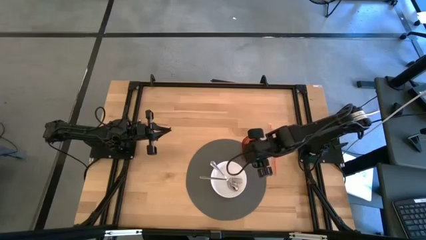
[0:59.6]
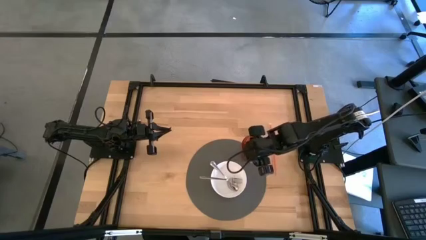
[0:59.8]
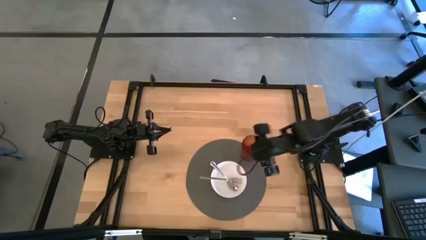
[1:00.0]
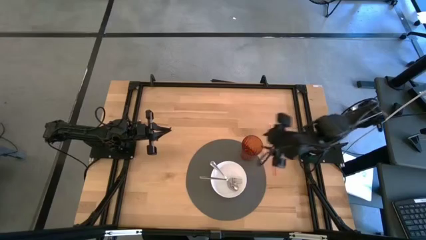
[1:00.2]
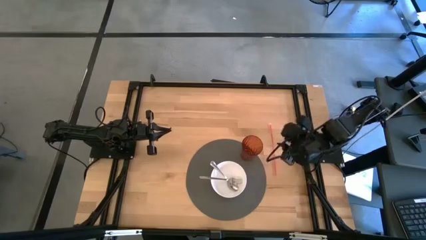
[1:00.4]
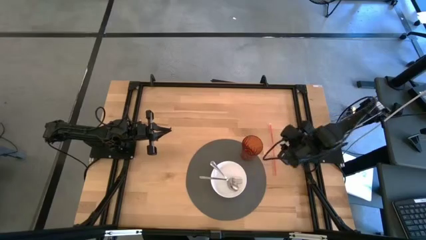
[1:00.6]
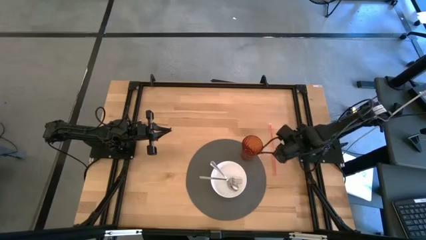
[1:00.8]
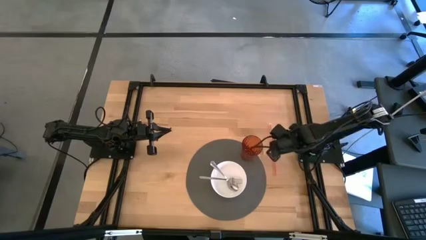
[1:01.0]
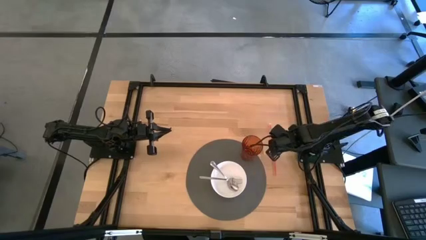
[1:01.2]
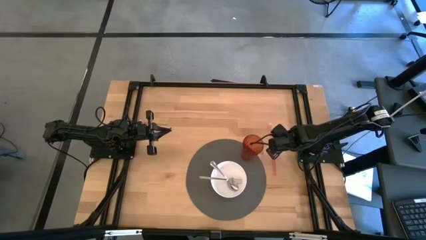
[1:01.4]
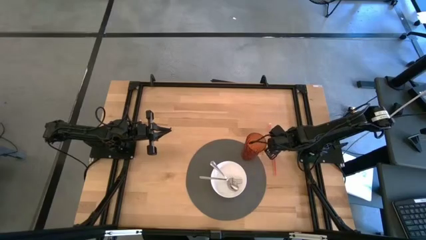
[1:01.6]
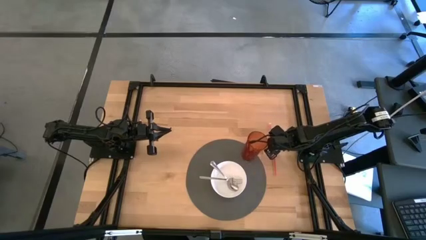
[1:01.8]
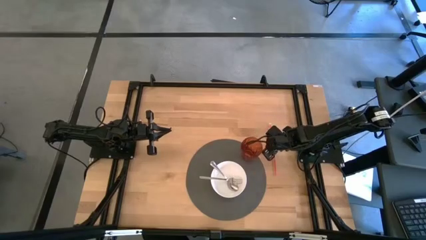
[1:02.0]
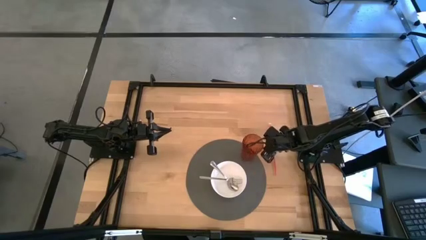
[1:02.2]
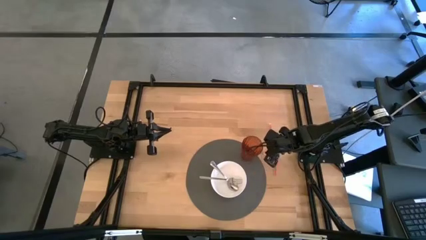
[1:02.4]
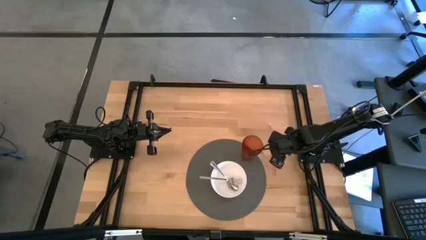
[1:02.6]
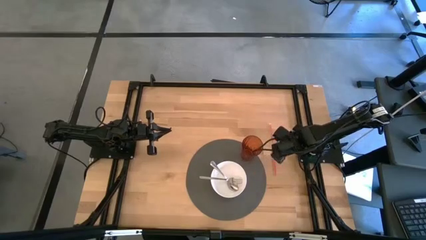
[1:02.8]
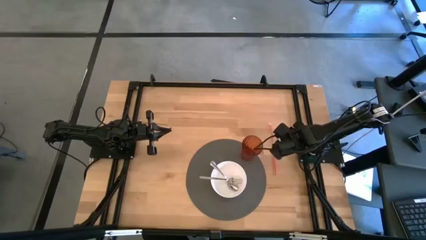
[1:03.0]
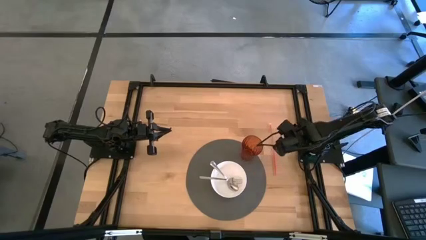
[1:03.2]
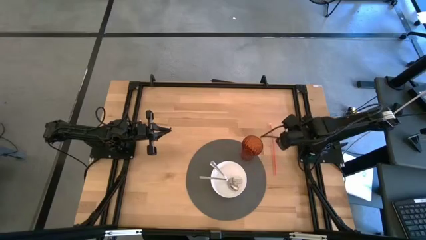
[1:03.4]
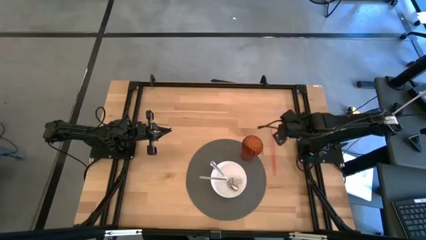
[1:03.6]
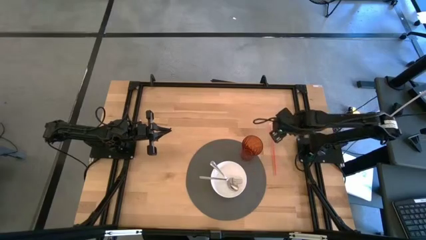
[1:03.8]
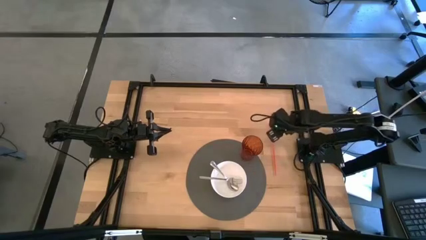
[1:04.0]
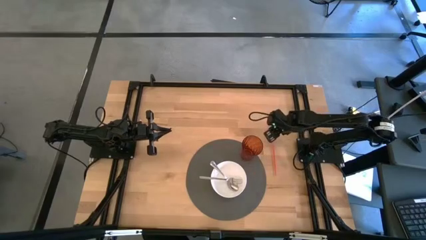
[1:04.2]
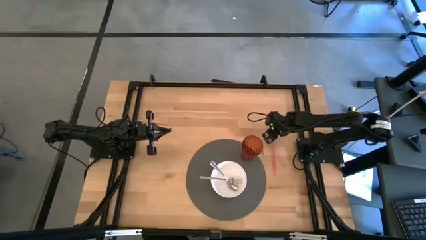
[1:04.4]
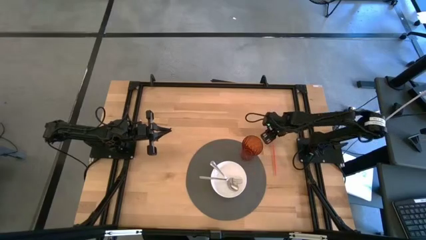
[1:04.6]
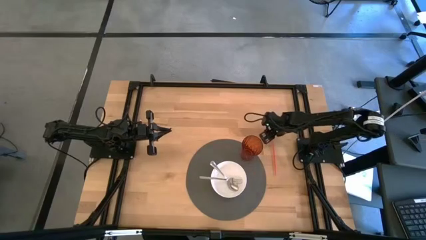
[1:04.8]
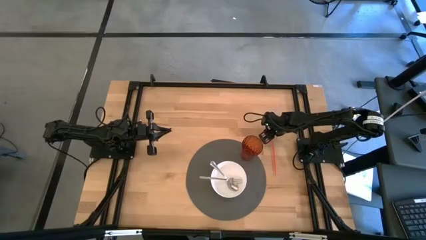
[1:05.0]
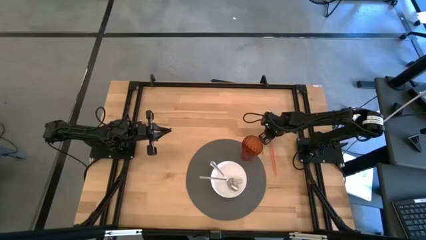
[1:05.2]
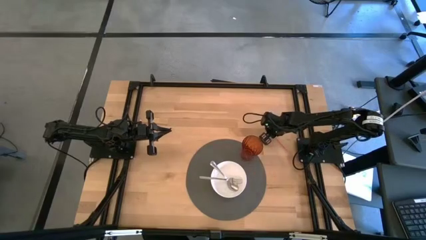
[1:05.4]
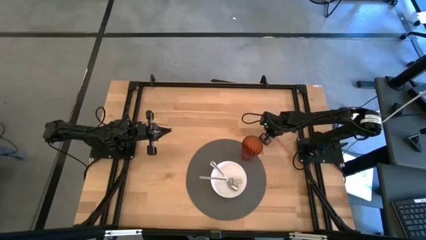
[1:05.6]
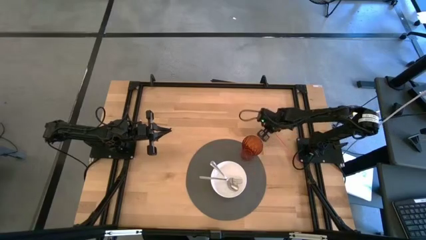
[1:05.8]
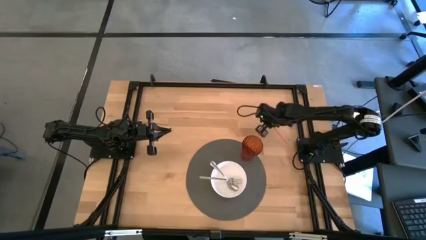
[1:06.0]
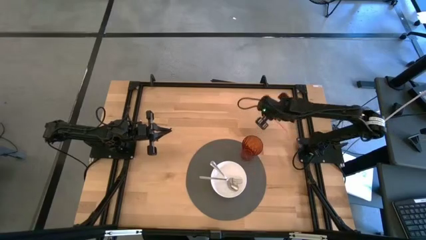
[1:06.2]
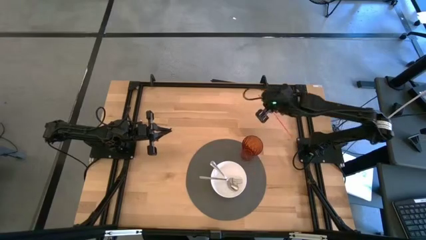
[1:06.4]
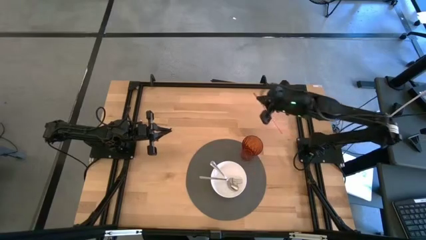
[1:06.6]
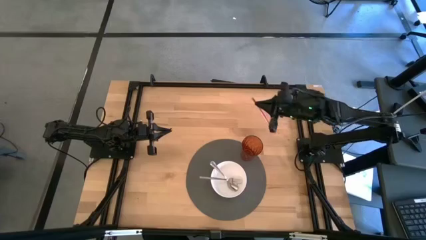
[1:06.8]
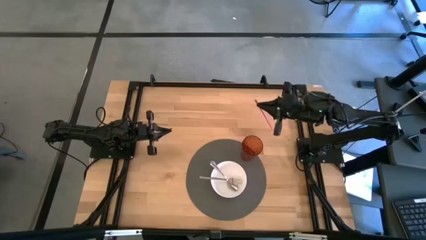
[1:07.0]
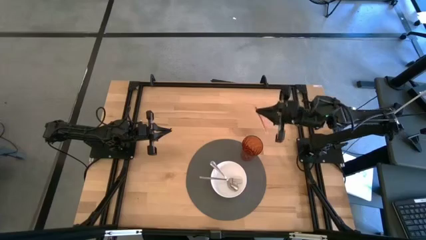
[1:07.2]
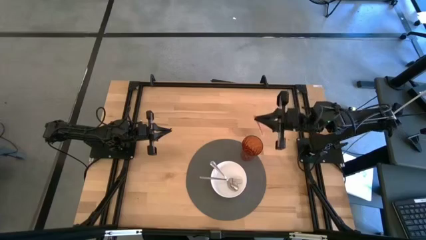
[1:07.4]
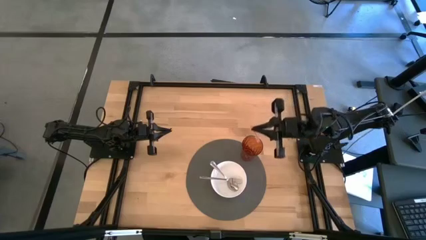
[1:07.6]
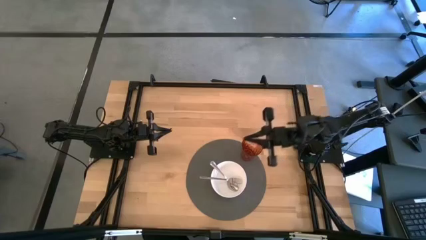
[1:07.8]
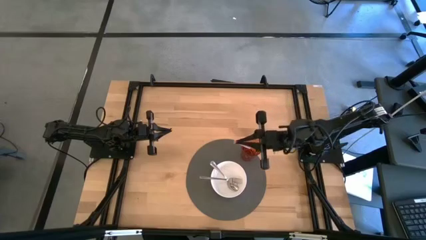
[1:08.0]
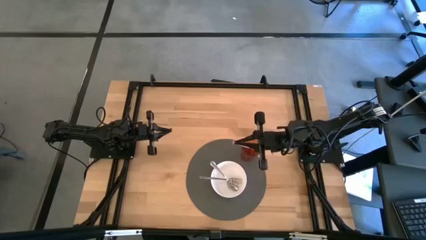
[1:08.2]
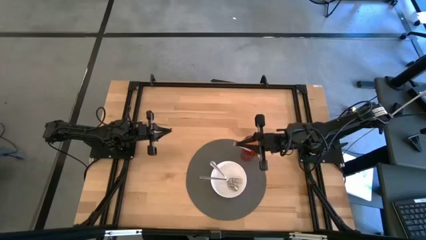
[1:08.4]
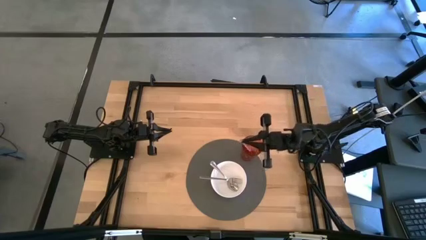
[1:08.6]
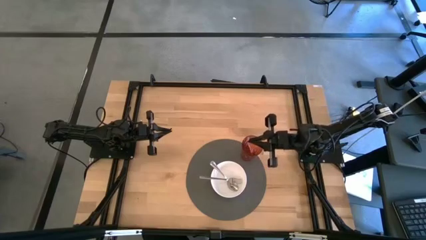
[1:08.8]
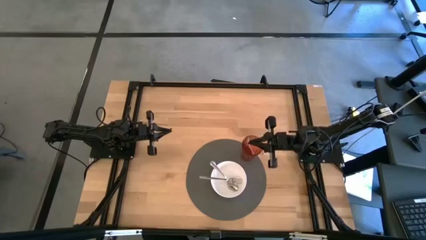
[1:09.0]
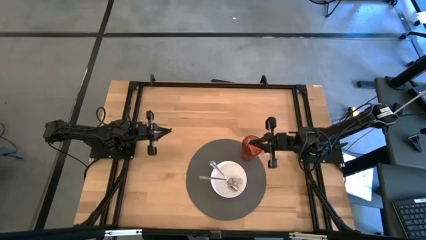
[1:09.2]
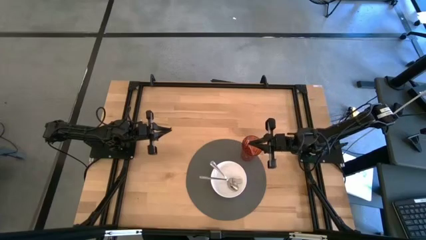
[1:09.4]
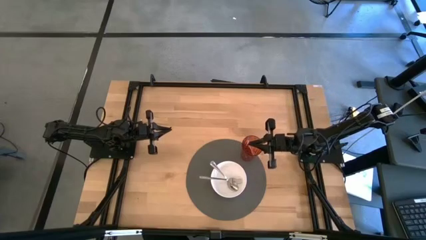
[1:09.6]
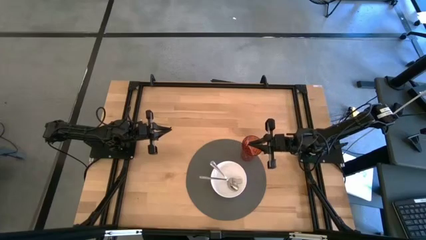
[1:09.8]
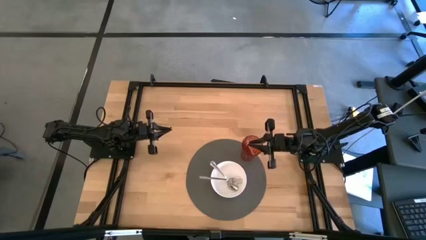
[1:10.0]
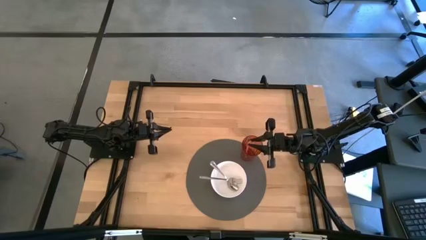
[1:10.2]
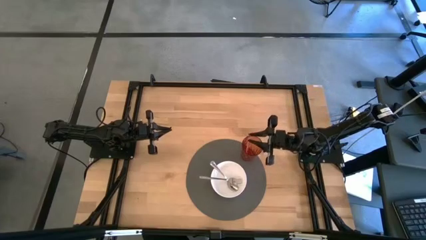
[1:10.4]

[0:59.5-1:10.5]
Task: Pick & Place Utensil
Put the orange straw into the orange cup

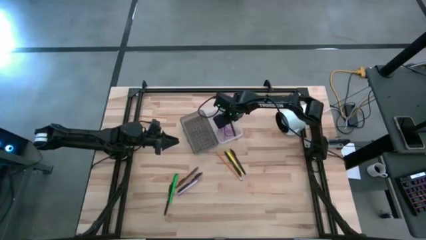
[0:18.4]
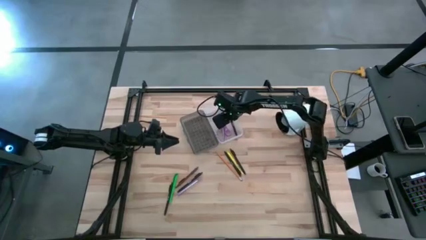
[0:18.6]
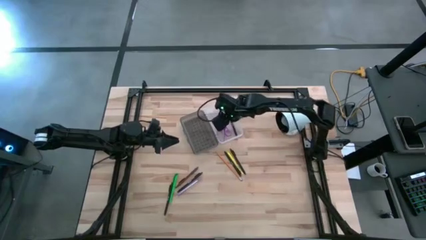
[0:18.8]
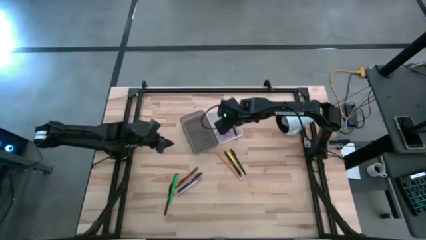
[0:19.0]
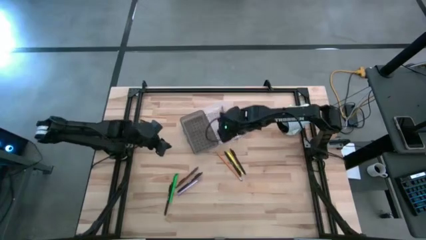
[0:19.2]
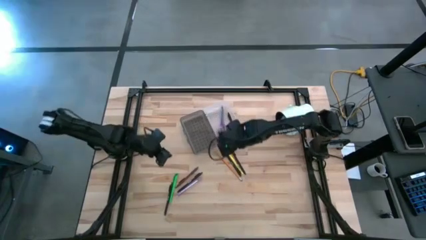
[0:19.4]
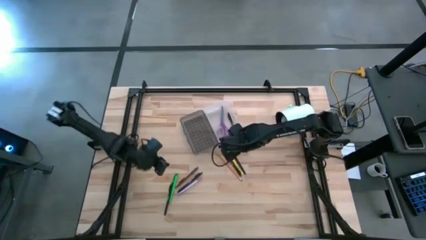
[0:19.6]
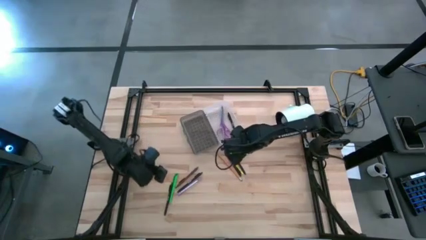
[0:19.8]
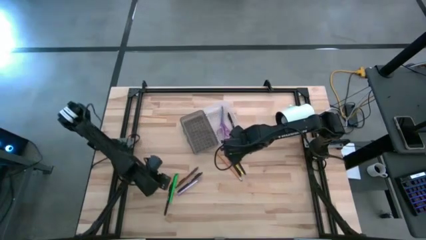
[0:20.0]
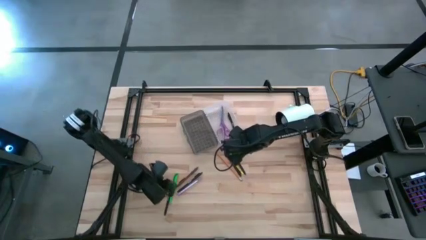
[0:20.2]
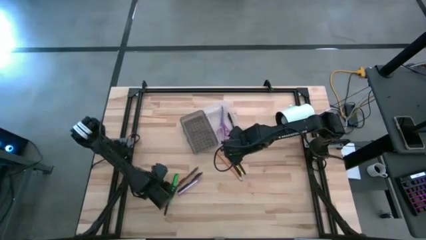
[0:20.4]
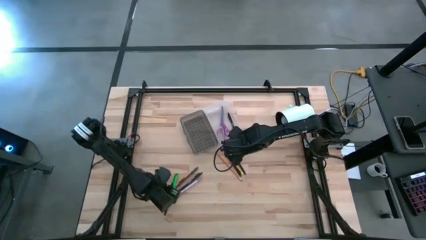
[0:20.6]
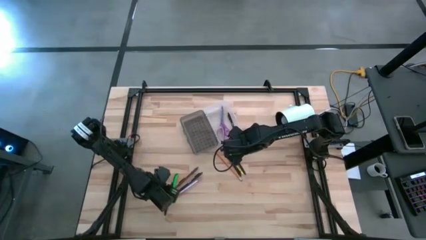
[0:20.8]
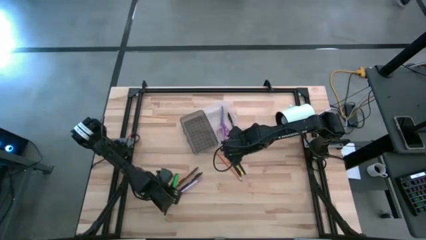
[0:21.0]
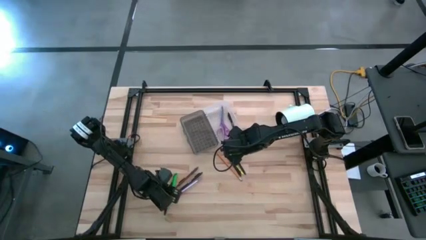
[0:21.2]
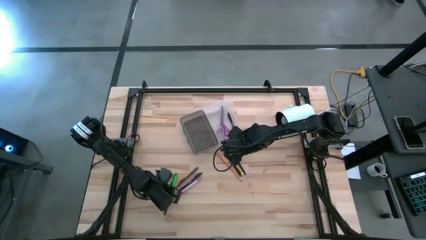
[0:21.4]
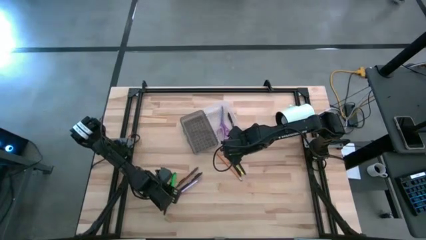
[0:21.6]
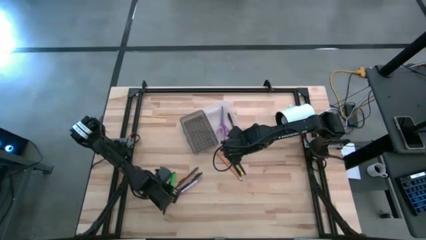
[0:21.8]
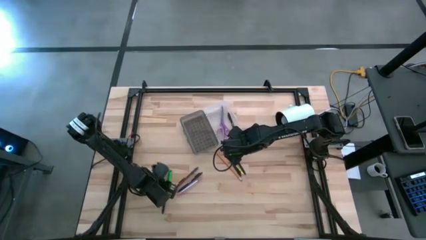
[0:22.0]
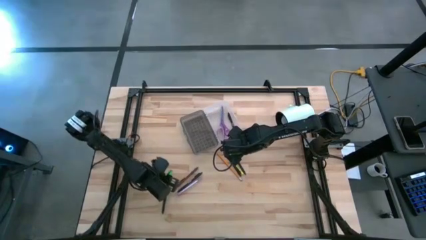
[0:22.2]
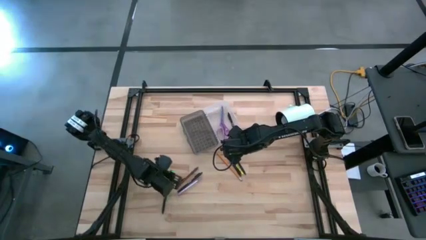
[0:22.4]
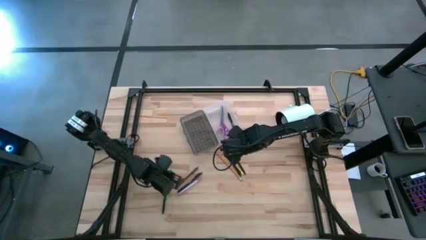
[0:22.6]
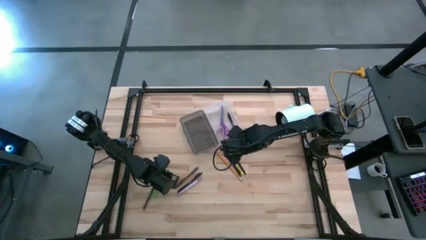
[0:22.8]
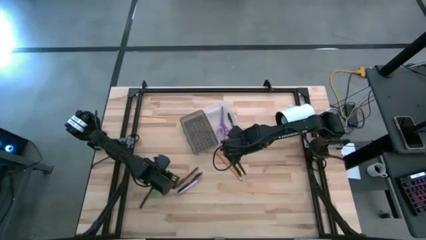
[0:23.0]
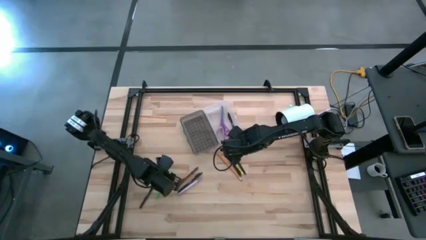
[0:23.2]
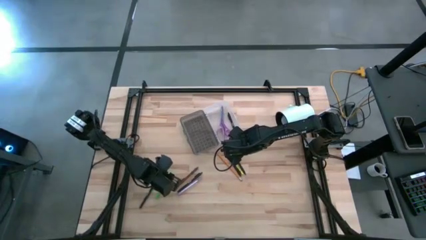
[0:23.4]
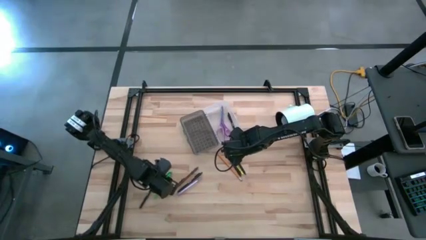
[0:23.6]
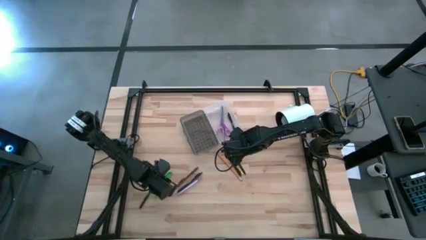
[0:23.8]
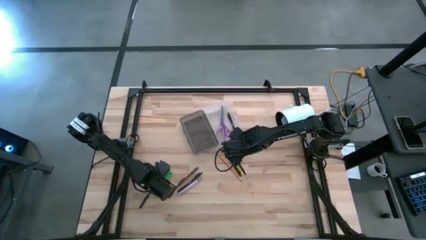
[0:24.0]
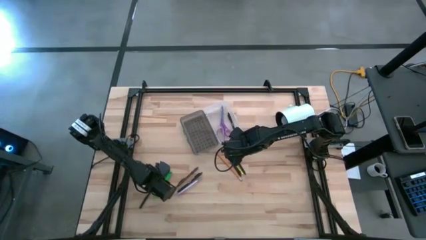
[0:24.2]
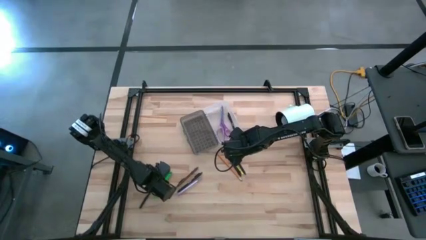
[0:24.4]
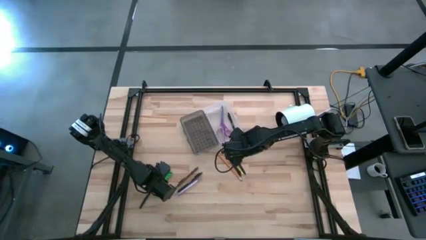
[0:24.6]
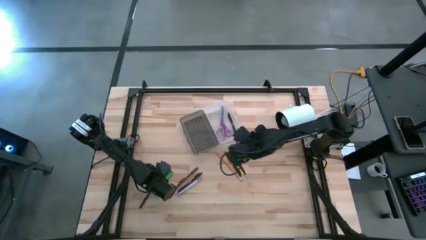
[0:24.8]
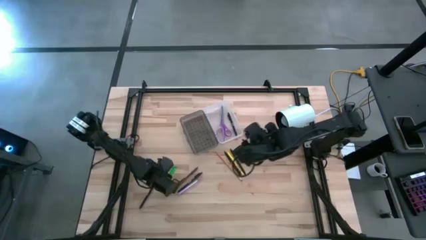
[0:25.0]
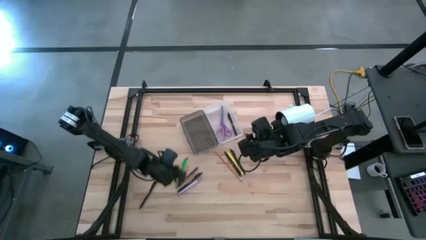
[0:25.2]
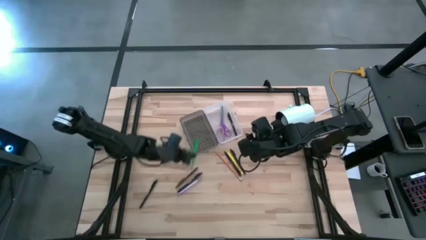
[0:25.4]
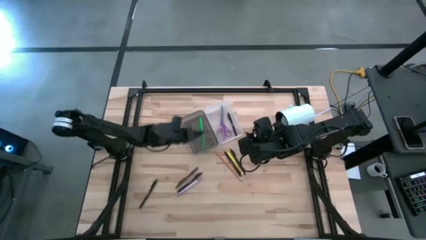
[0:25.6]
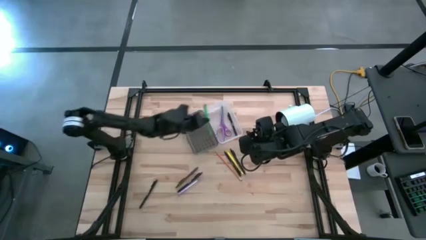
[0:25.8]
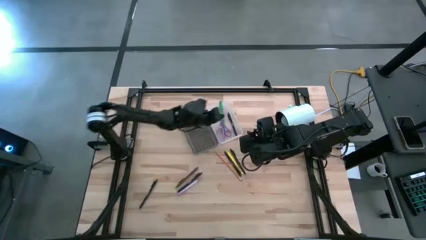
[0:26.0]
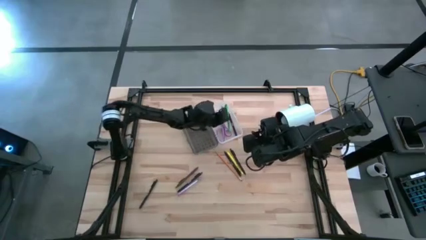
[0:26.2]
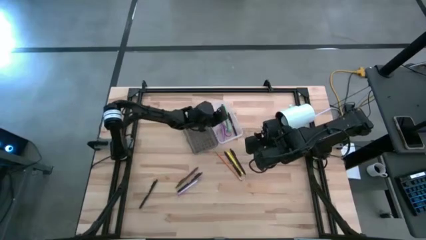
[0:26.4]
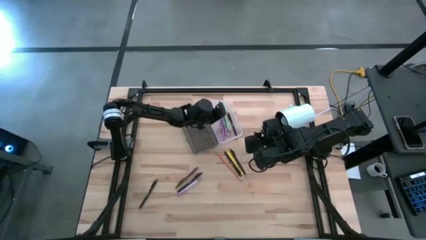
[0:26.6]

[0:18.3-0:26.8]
Task: Pick & place school supplies into a supply box
Put the green pen into the black supply box
